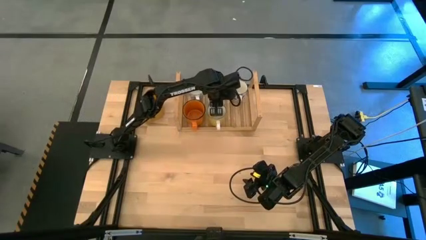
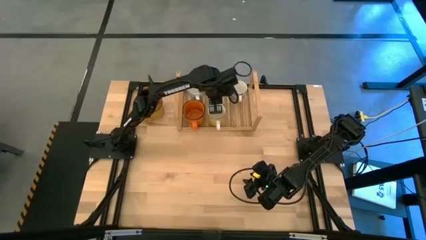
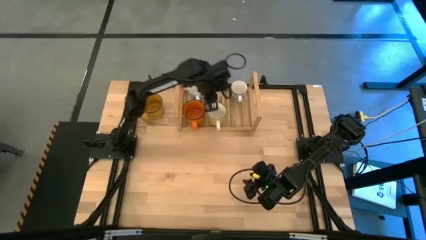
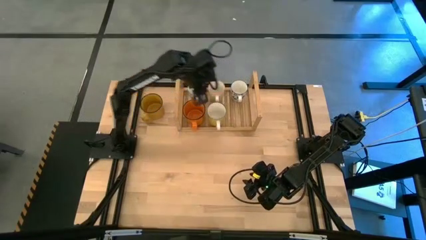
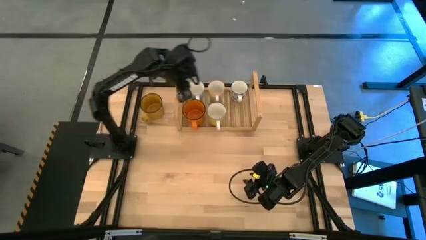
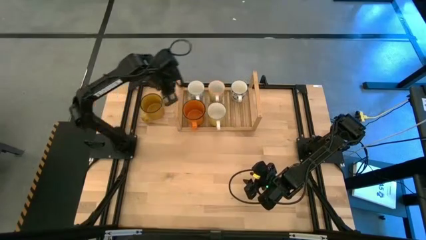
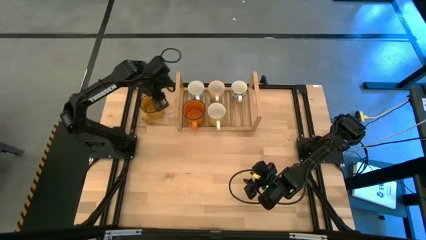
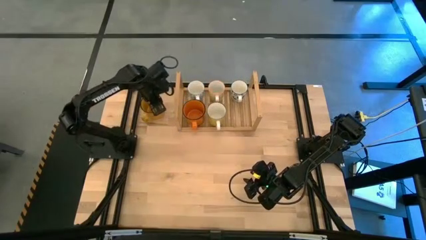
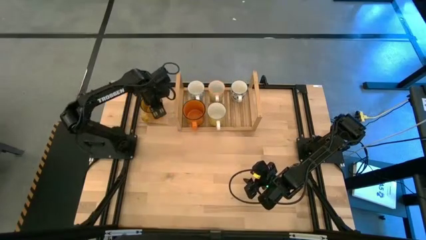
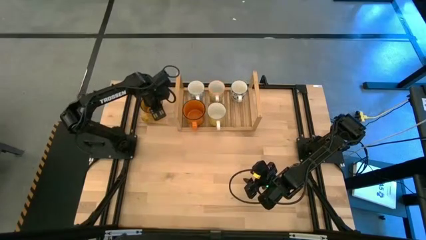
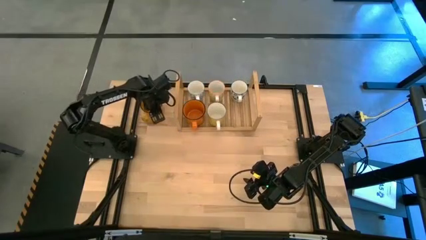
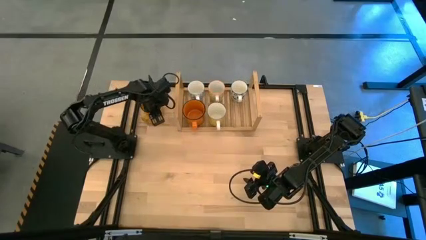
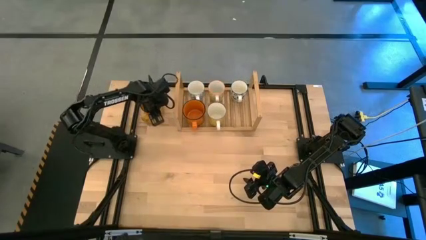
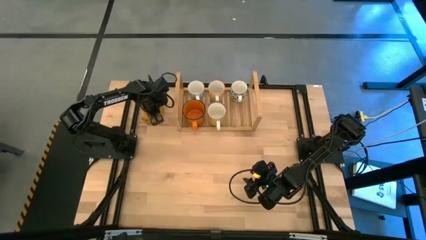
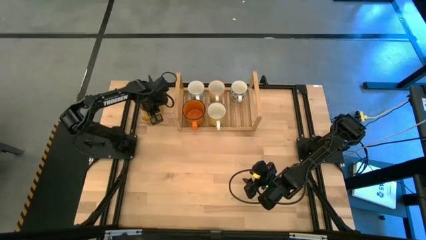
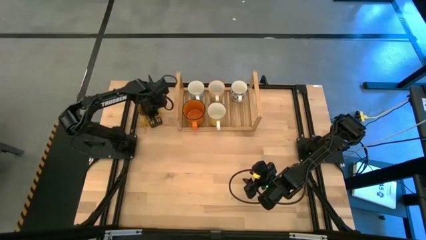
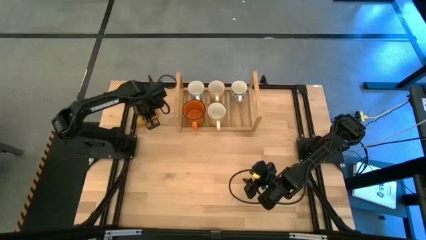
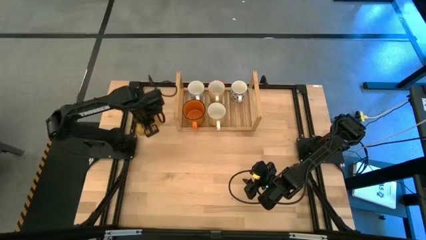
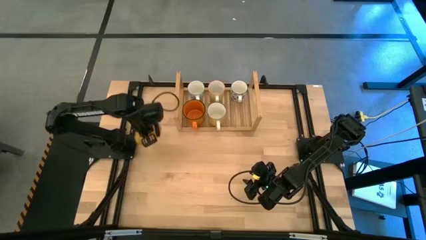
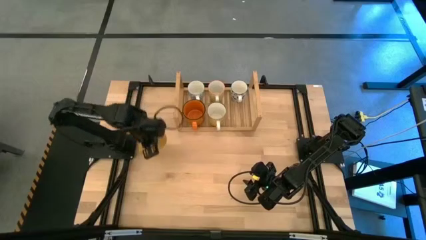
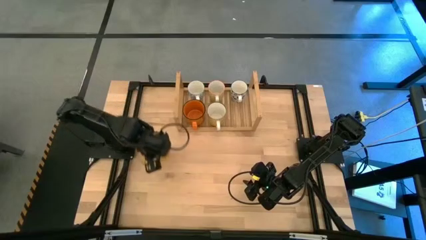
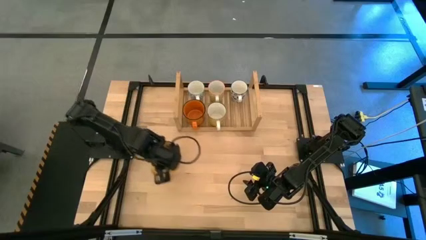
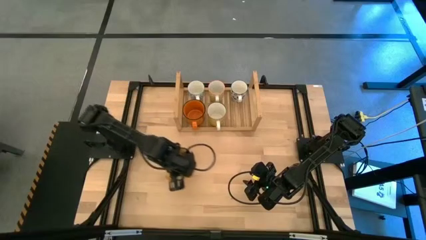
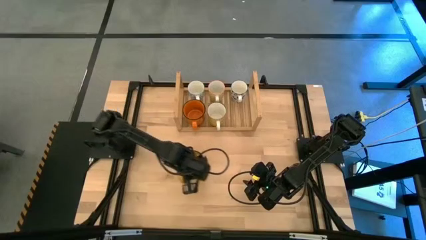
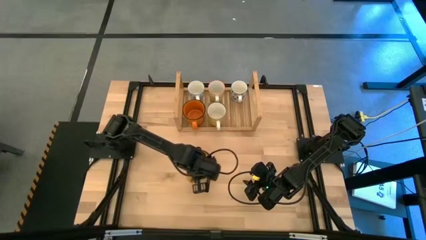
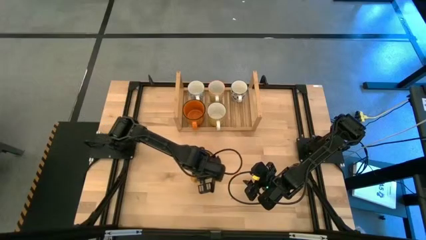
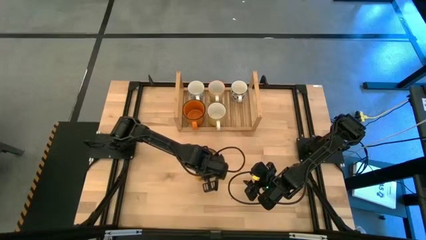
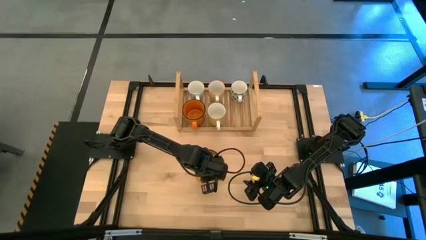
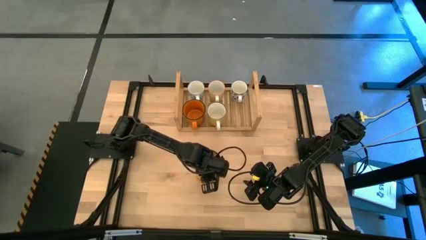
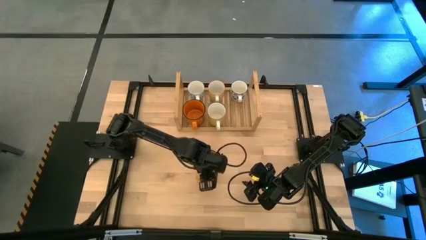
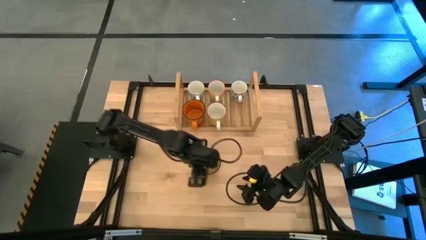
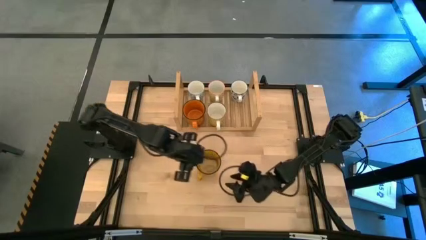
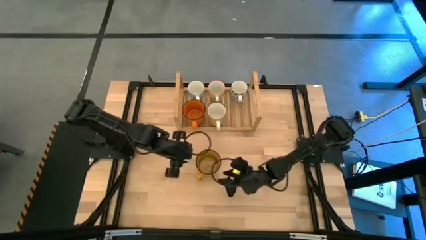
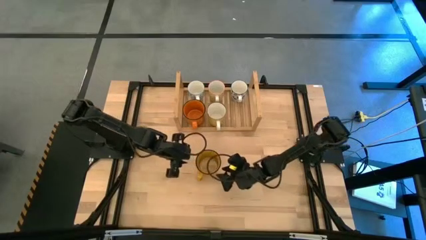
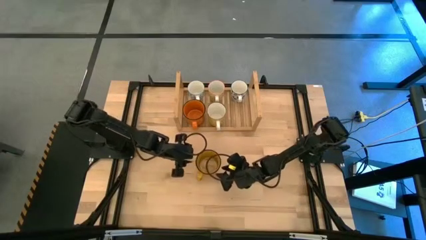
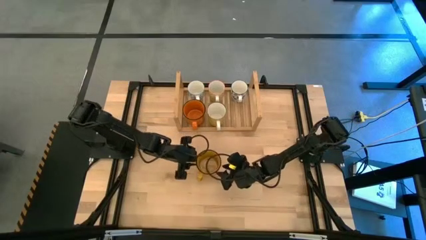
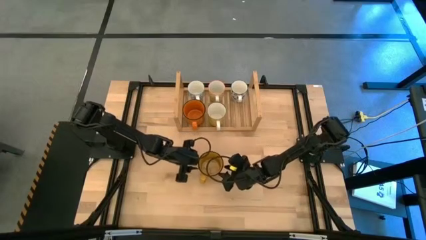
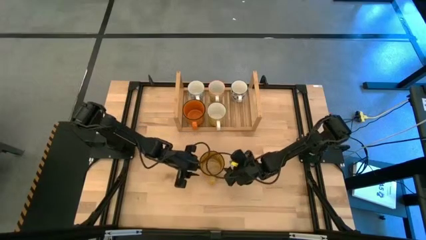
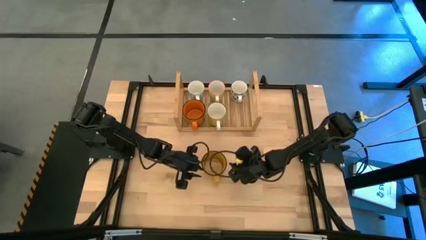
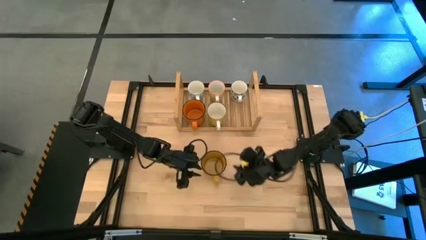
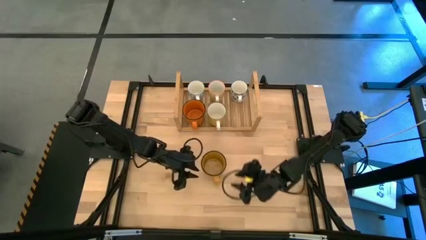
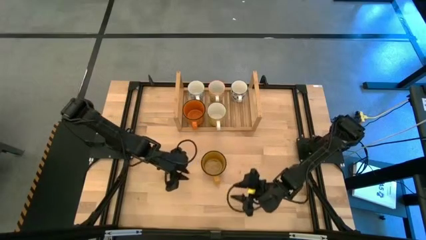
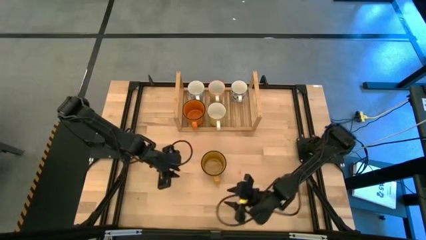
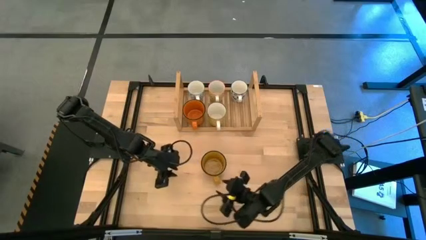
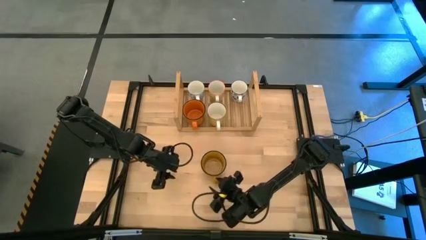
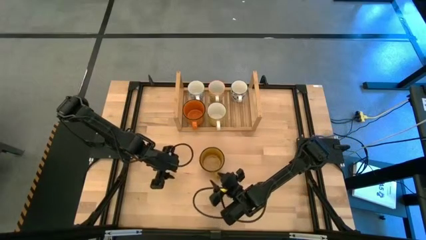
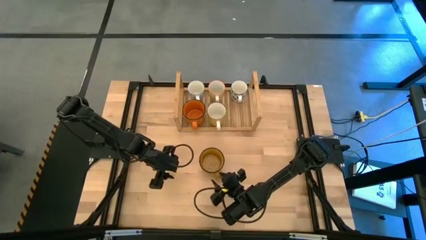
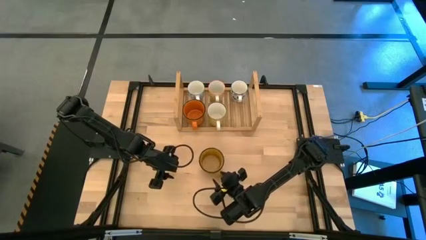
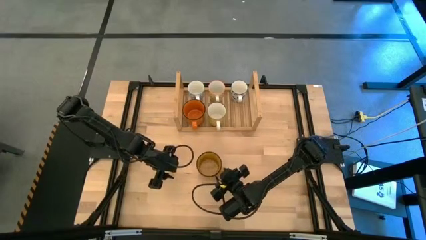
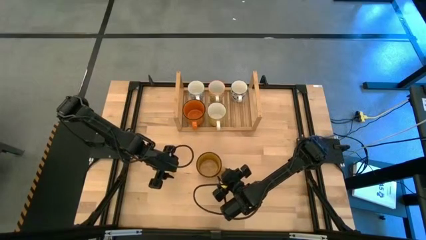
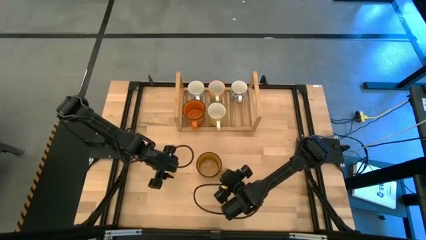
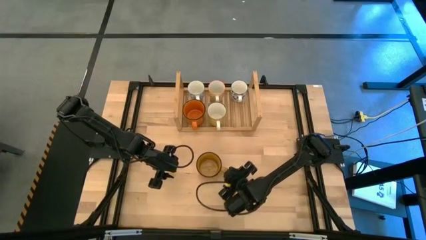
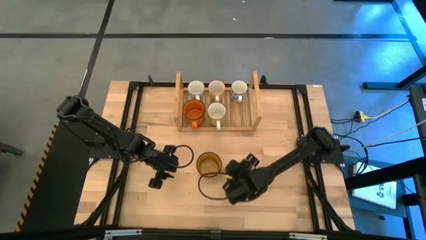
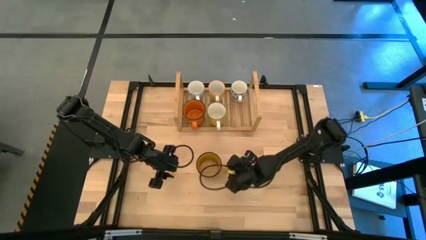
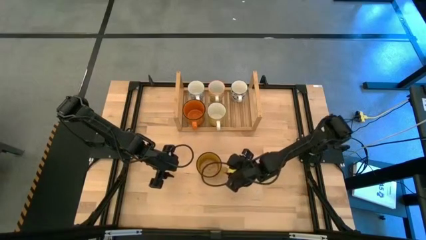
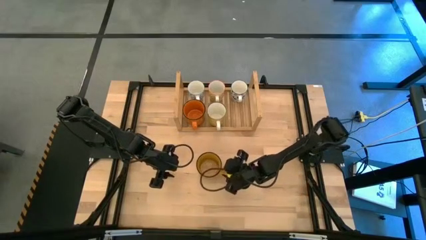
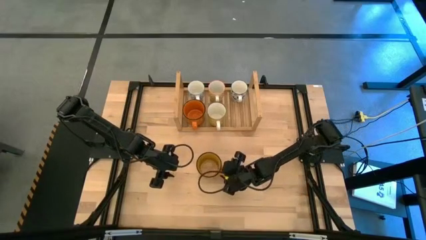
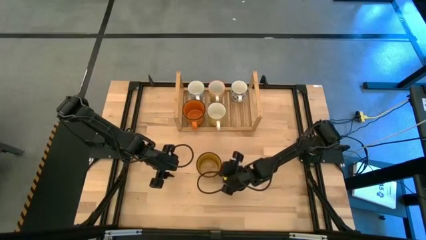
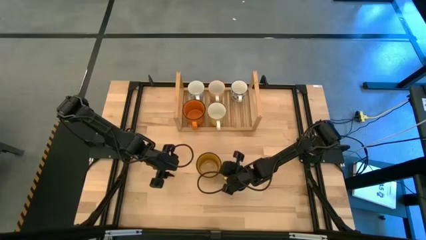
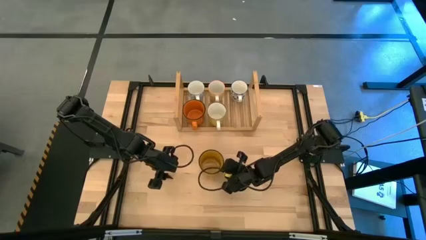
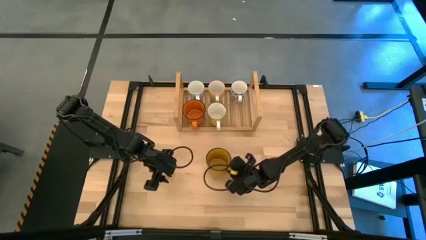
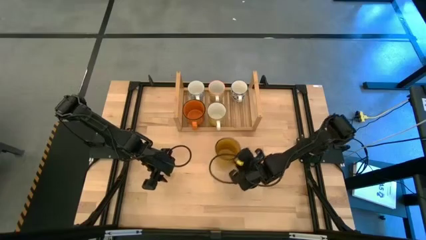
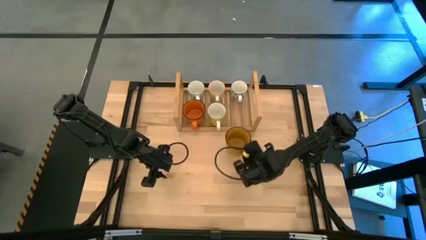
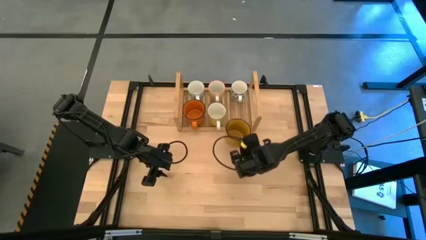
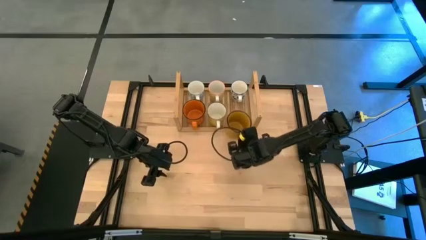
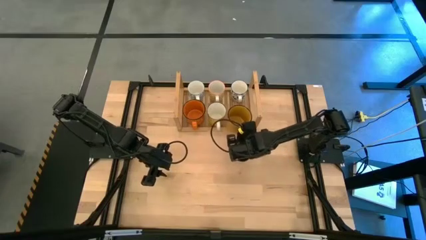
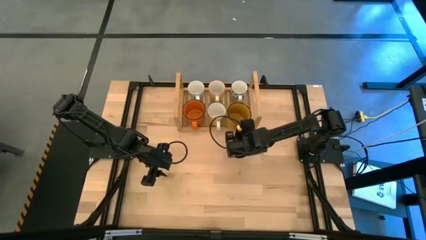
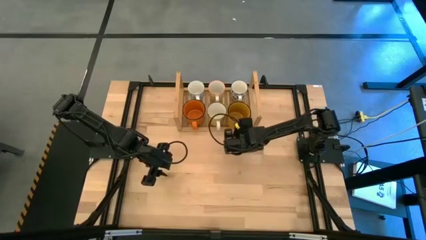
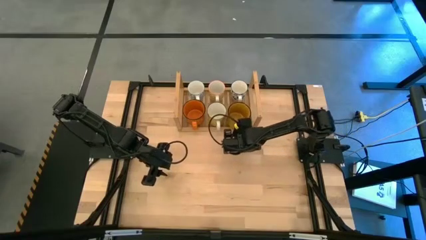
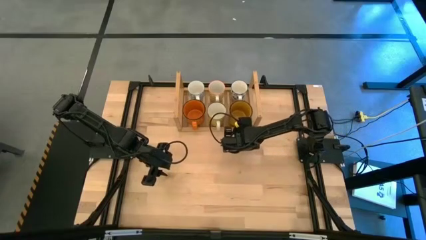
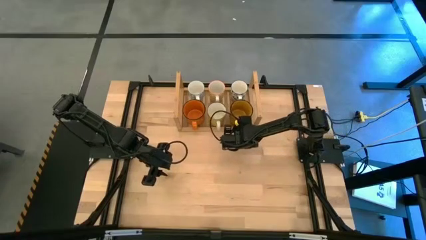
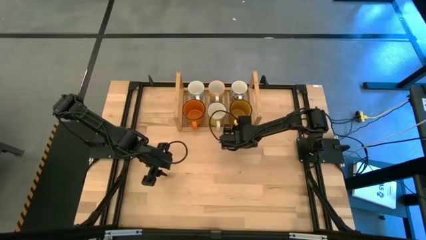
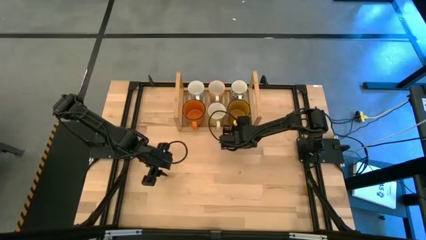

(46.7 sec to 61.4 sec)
Task: Place coffee mugs
Put the yellow mug on the shelf

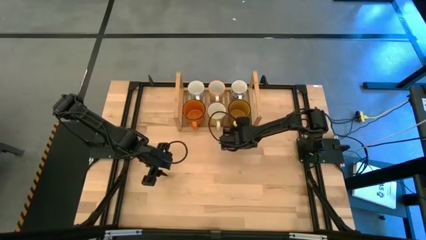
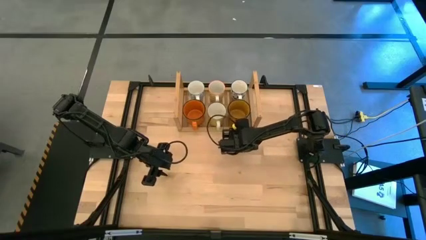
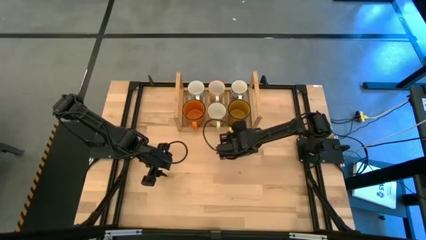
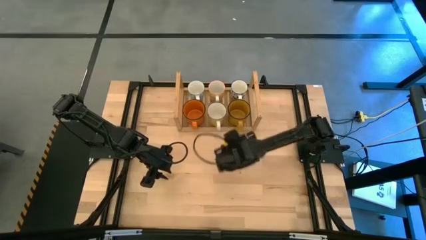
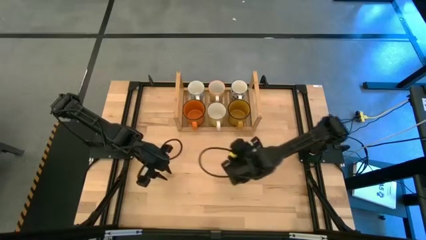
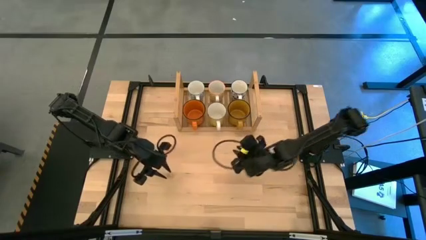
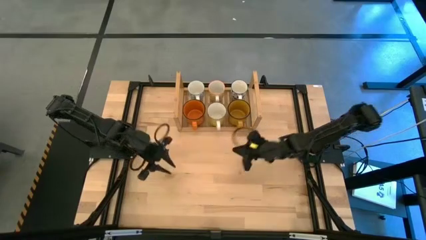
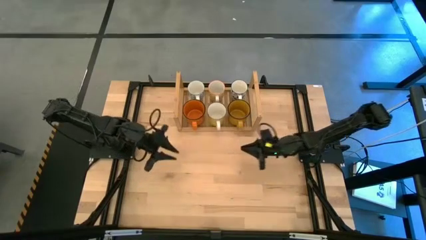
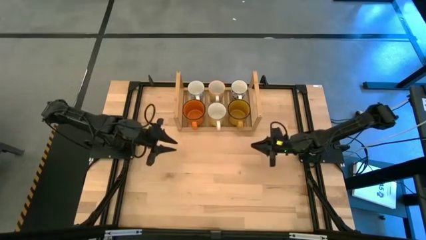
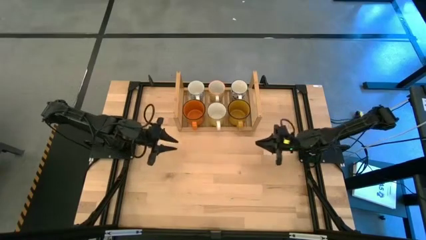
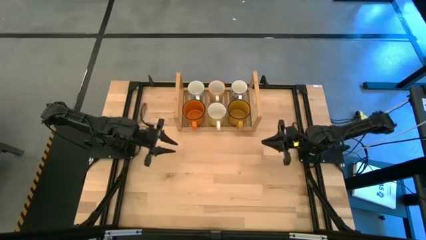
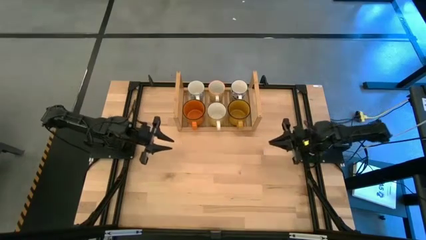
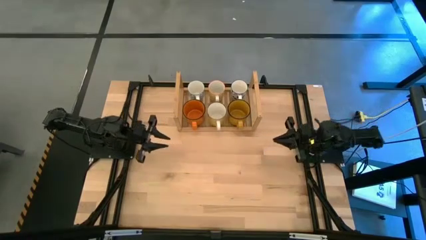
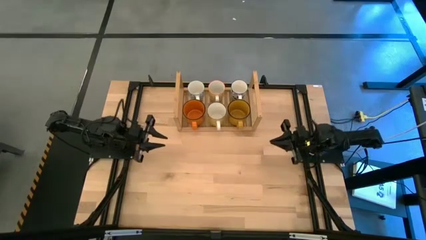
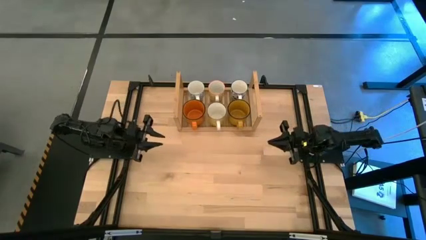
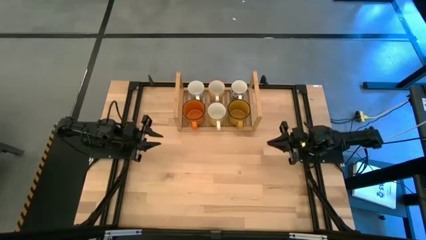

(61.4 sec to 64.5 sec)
Return to Home Position
